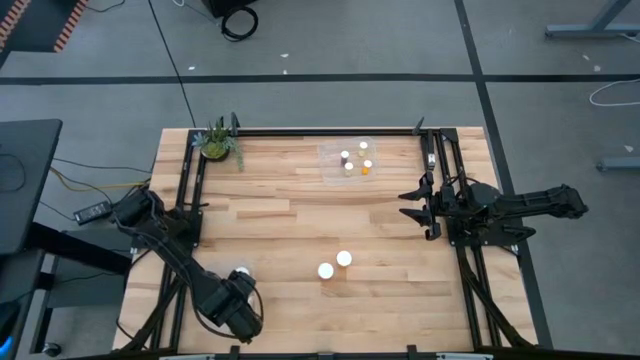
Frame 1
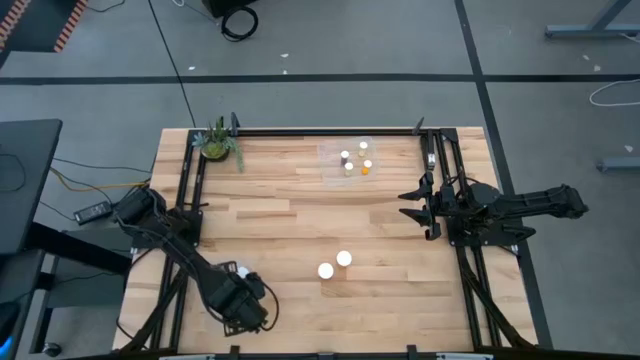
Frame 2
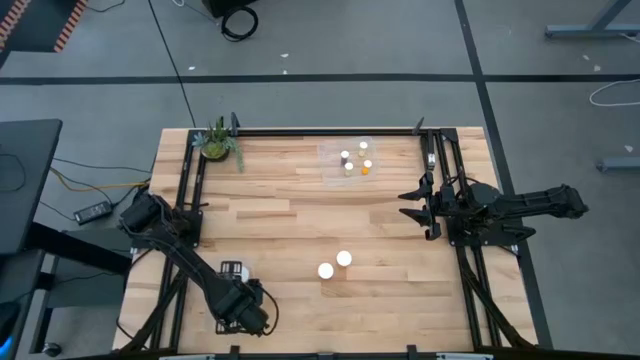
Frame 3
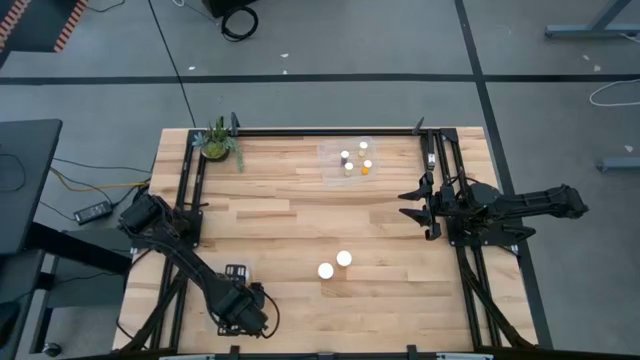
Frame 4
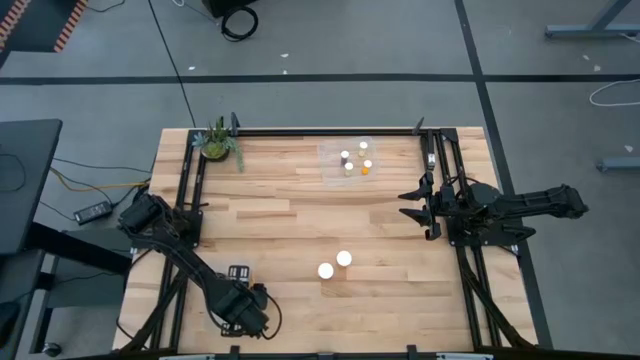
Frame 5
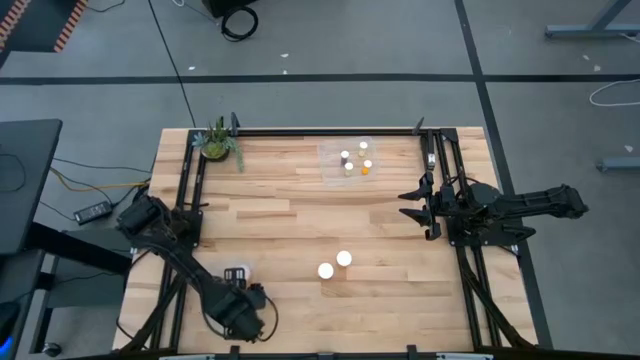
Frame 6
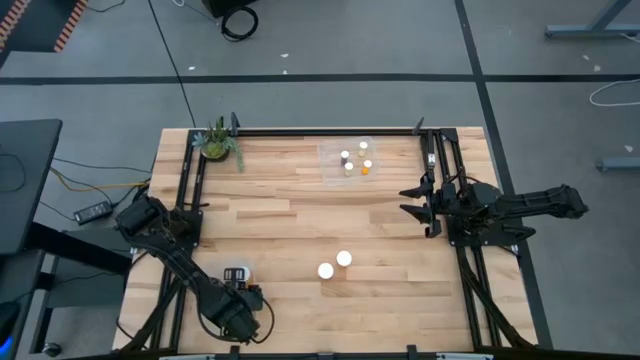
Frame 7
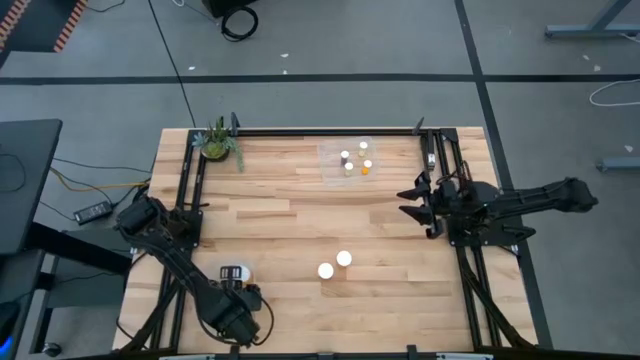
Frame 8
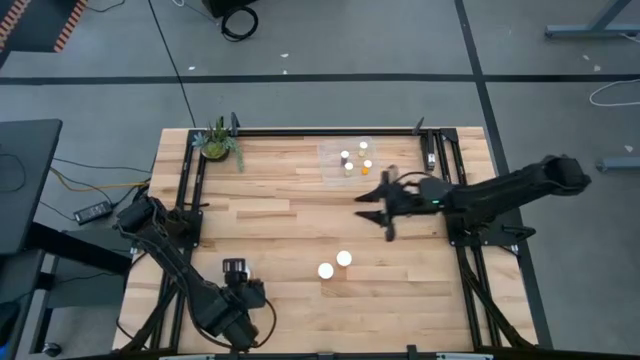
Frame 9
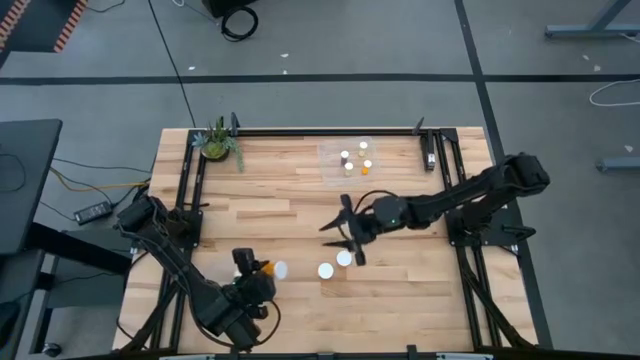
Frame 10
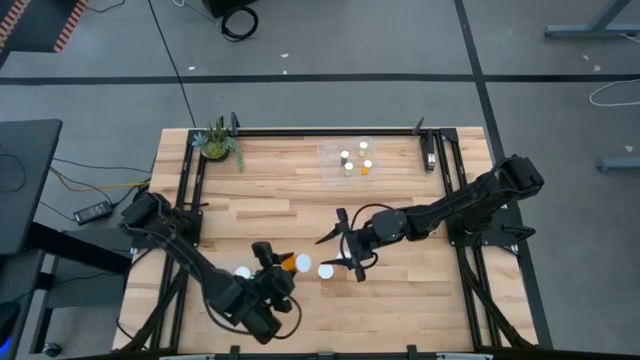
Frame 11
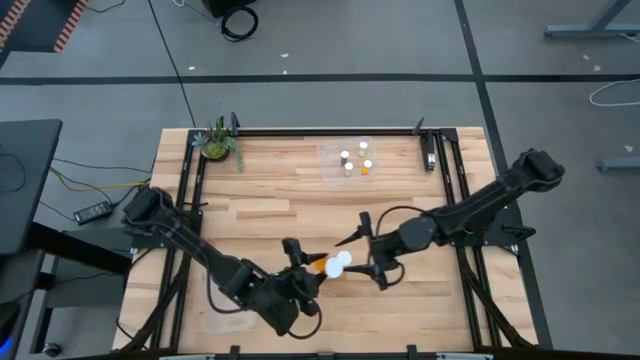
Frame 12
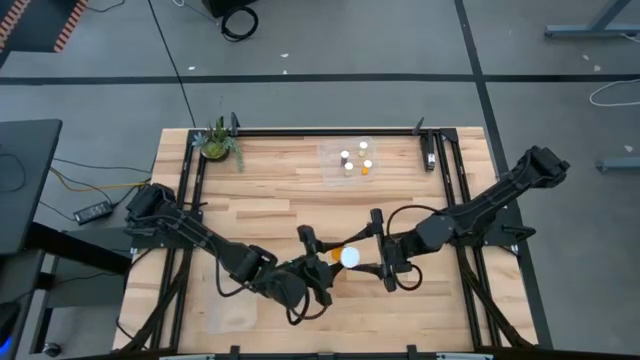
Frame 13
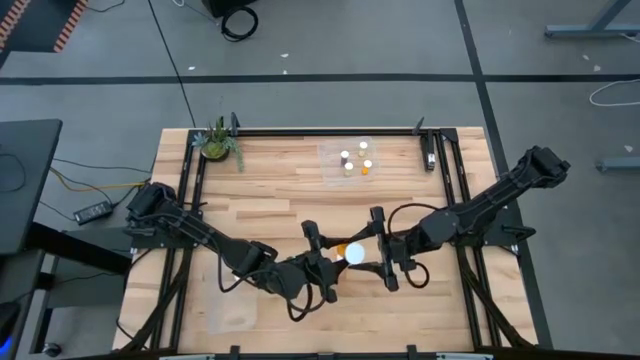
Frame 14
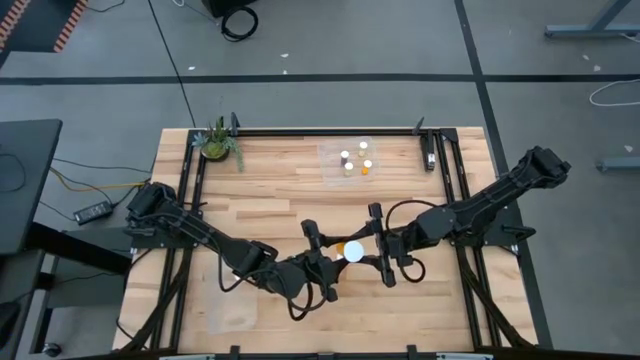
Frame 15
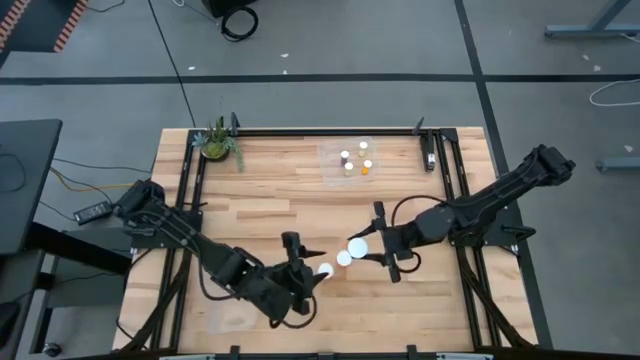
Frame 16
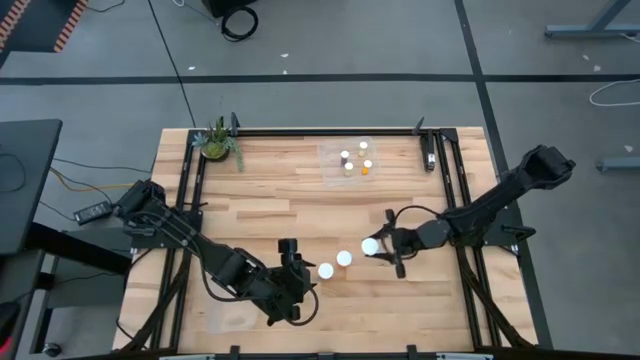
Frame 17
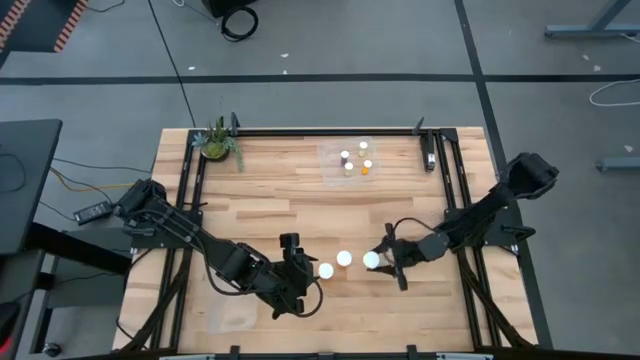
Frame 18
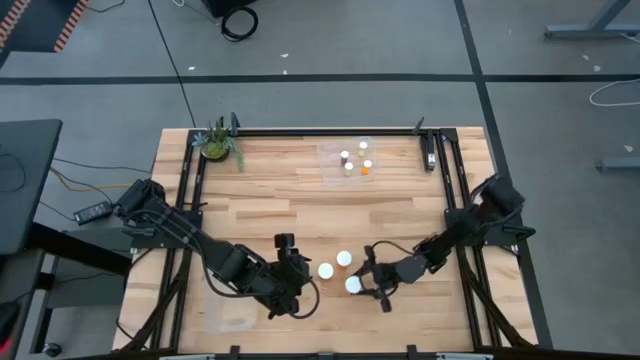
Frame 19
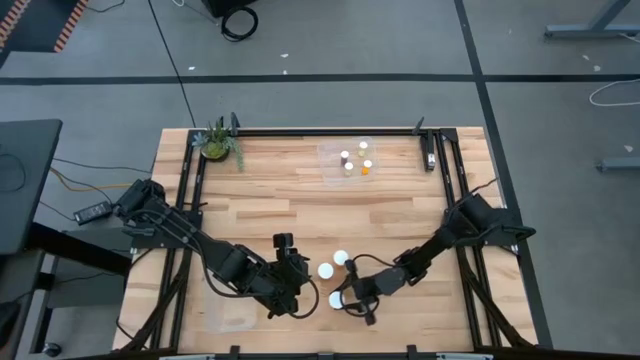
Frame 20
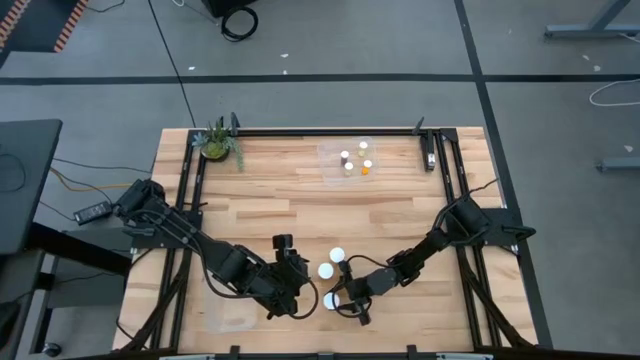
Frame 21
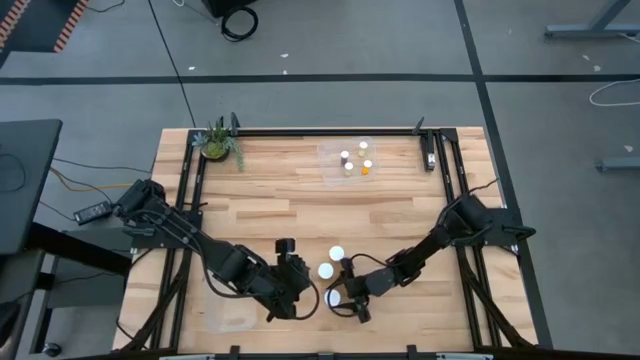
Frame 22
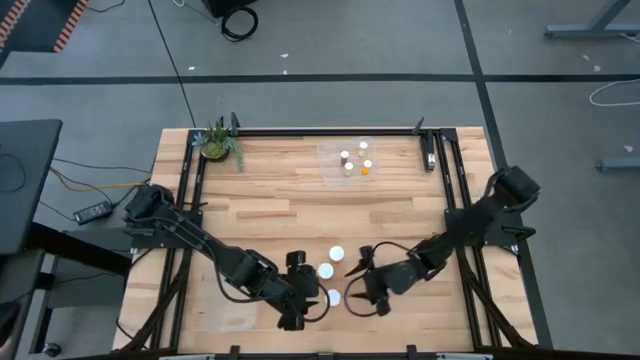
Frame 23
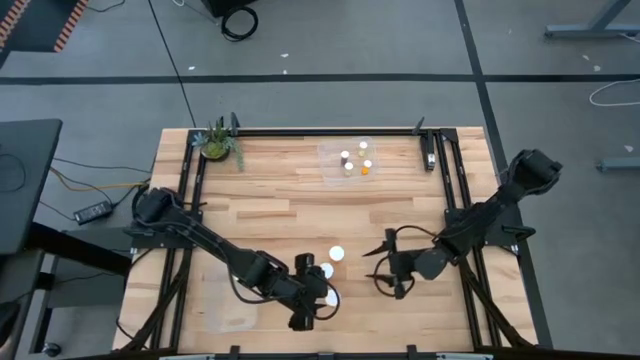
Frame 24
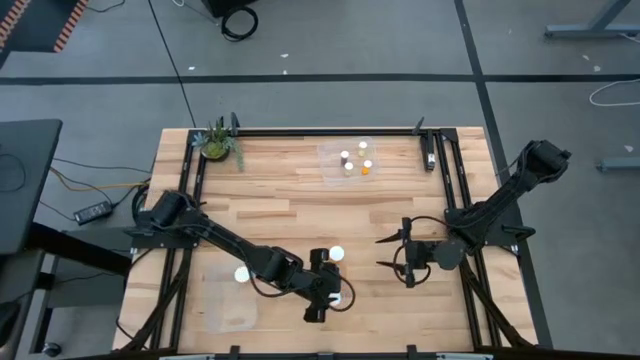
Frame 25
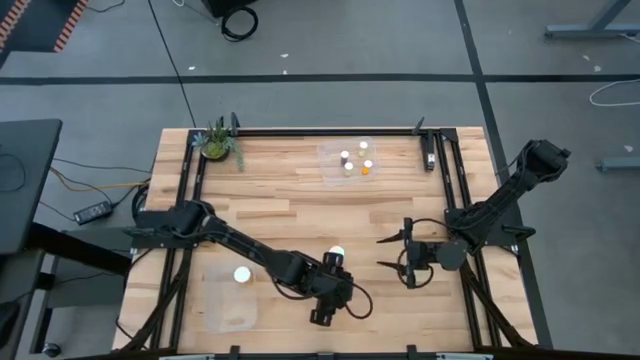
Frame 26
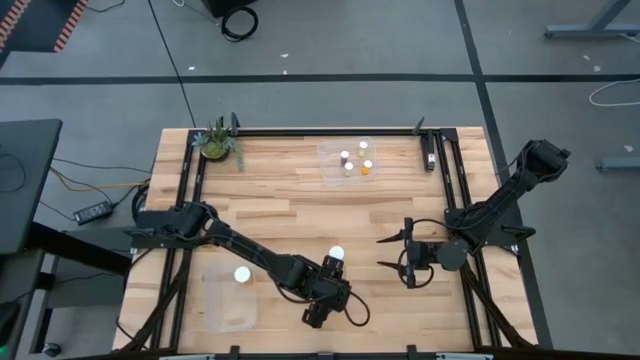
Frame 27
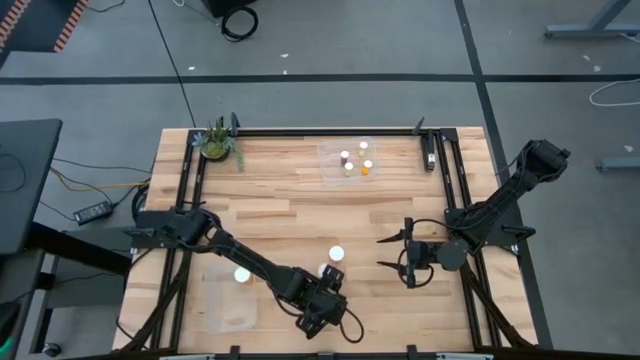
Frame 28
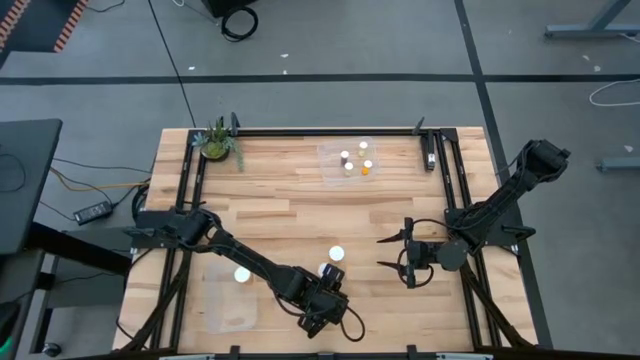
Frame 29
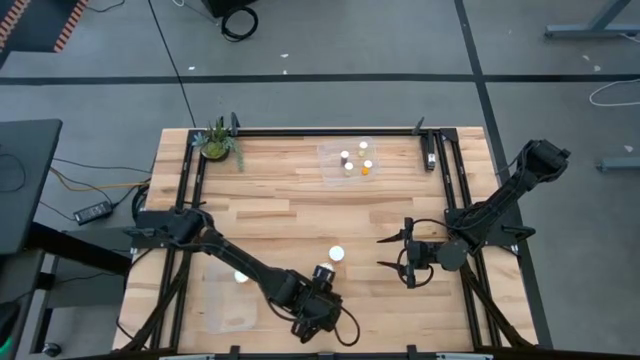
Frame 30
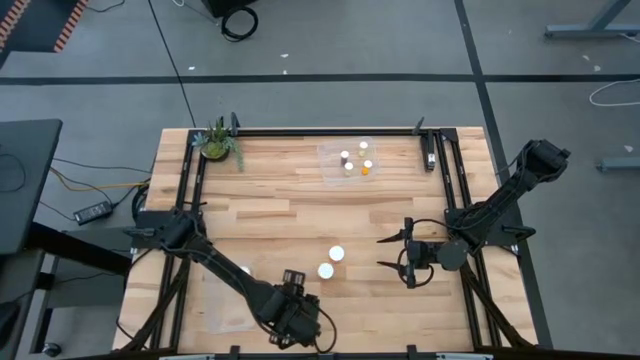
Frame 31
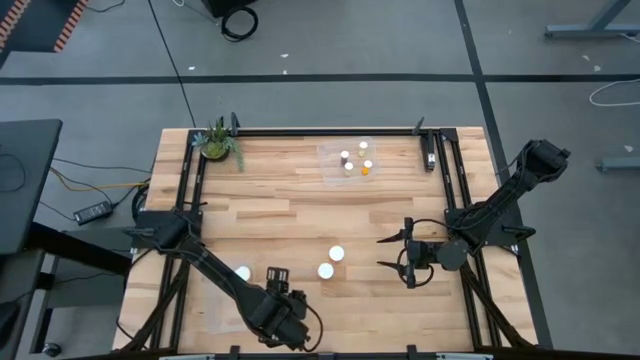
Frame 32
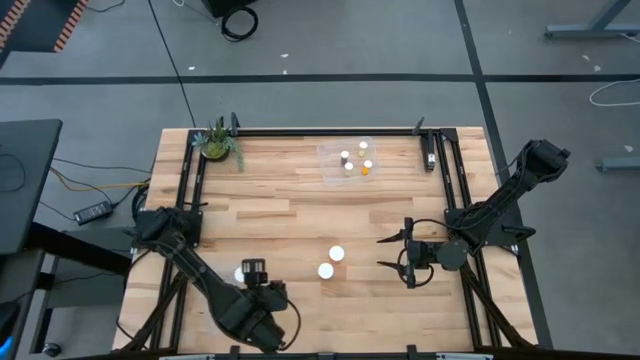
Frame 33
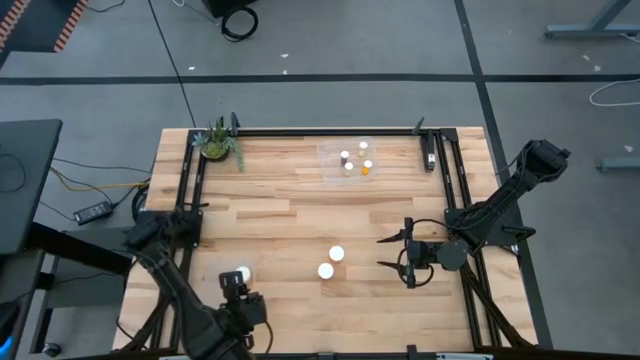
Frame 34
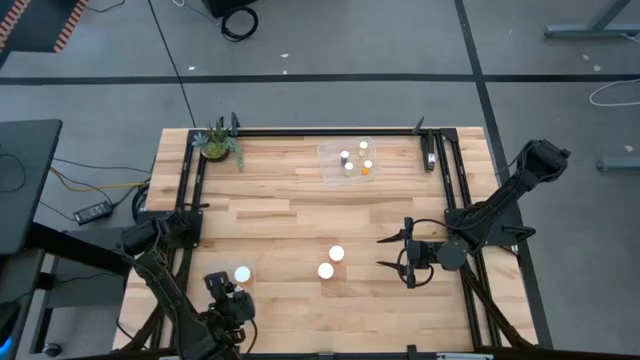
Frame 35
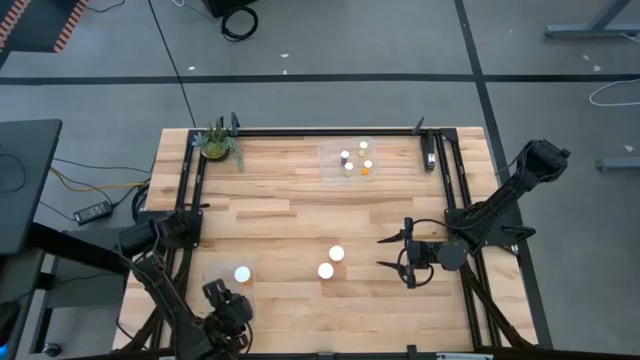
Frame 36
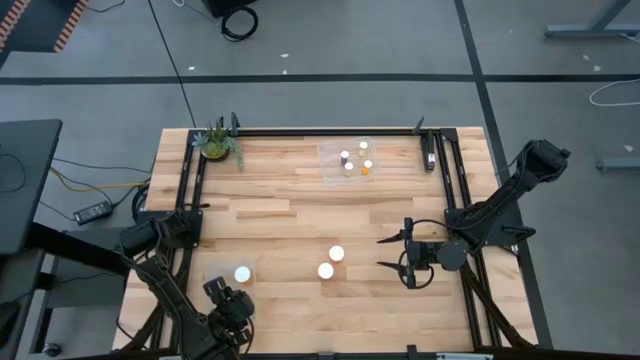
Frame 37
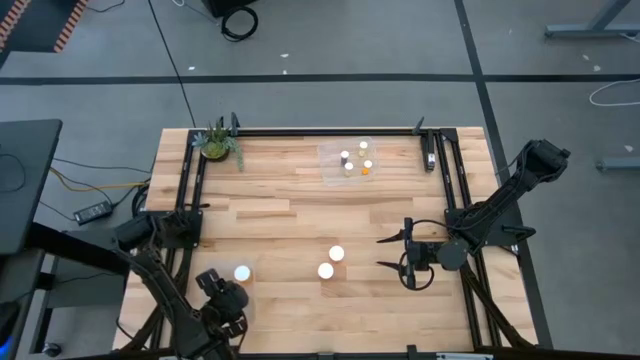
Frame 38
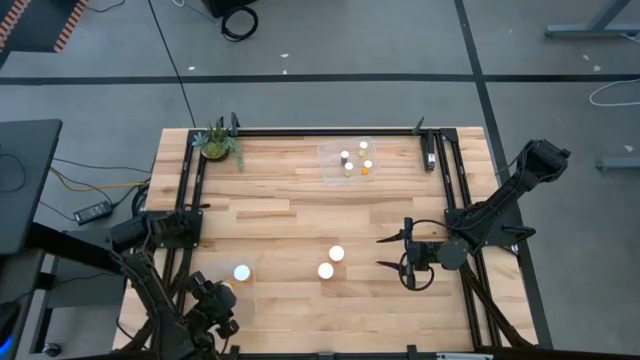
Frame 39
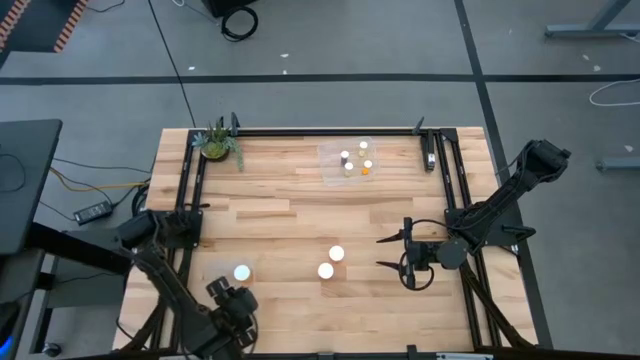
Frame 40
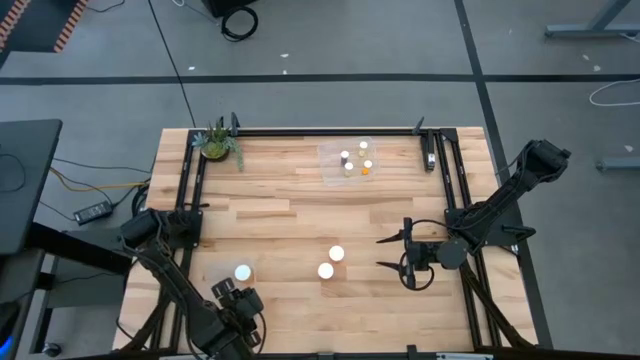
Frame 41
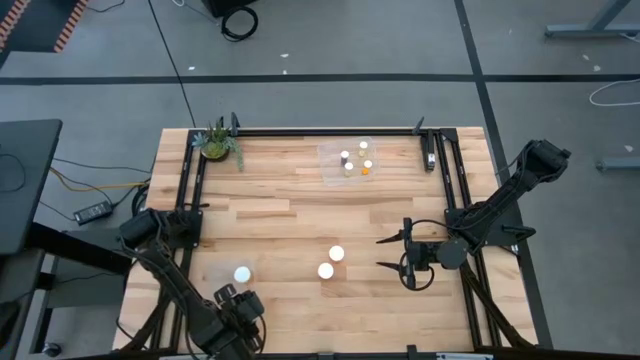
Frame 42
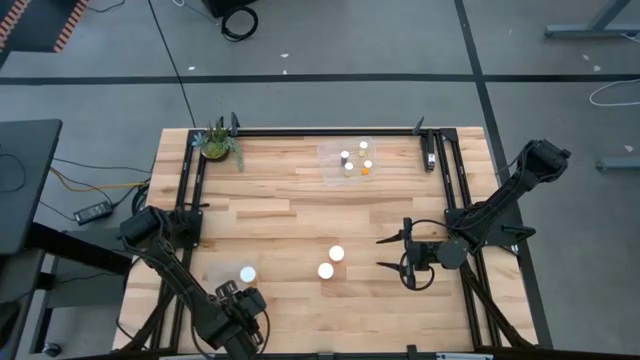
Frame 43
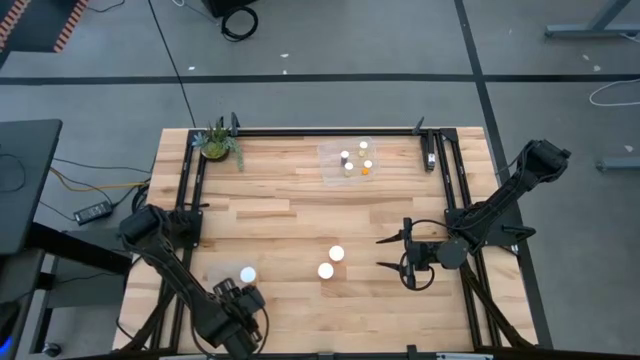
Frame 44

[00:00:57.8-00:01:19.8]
Task: Pick and place medicine bottles into bin by pill shape (circle, oval)
Put the big orange pill bottle into the bottom transparent bin
